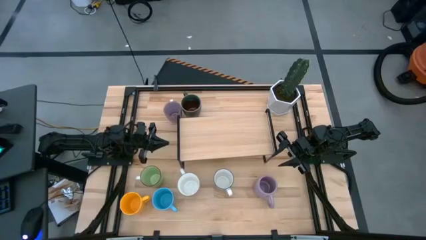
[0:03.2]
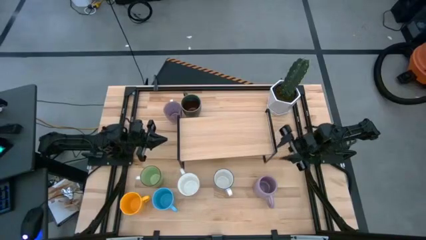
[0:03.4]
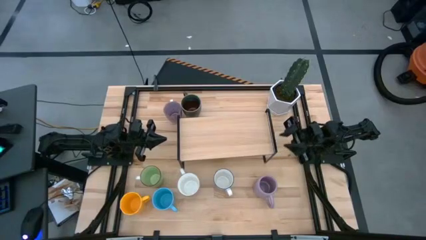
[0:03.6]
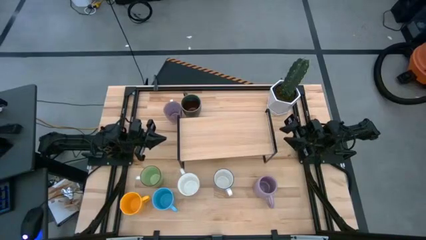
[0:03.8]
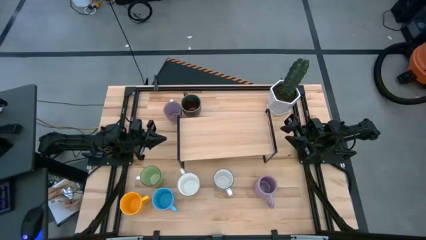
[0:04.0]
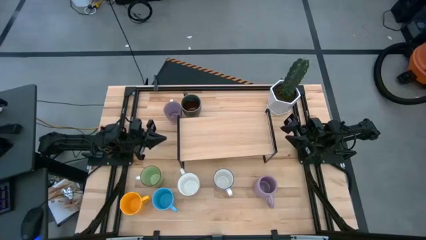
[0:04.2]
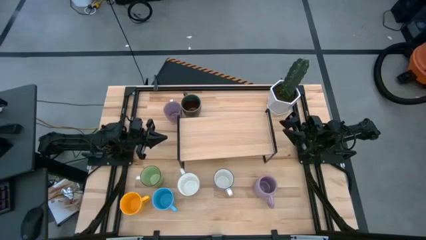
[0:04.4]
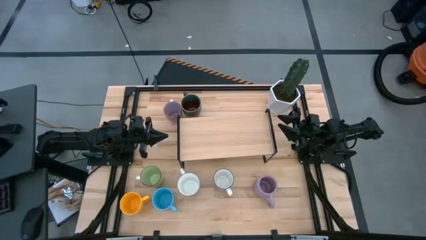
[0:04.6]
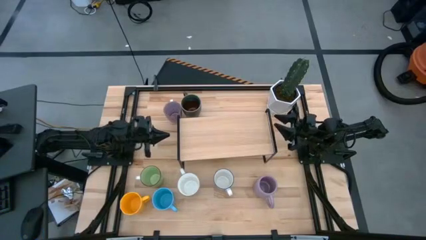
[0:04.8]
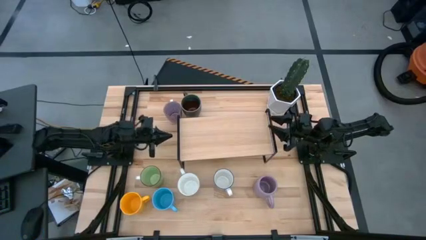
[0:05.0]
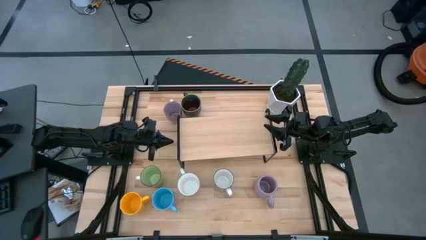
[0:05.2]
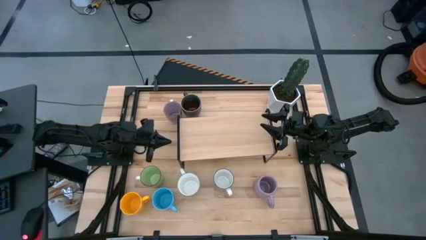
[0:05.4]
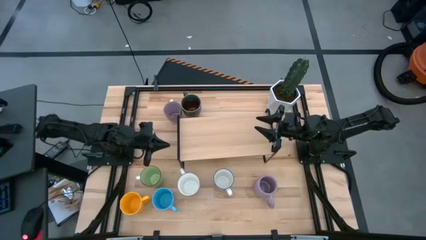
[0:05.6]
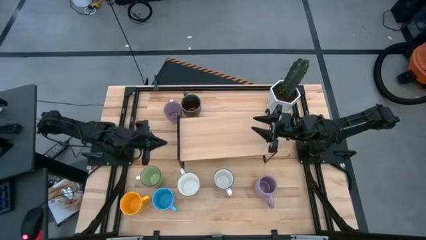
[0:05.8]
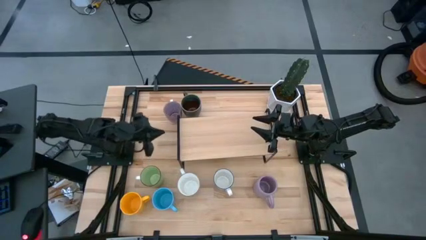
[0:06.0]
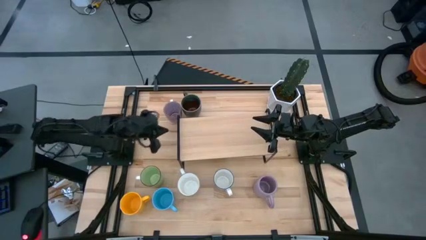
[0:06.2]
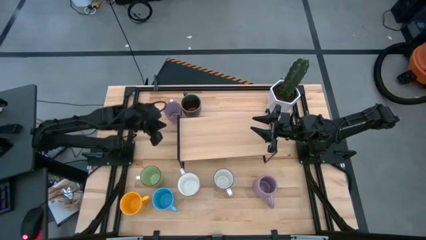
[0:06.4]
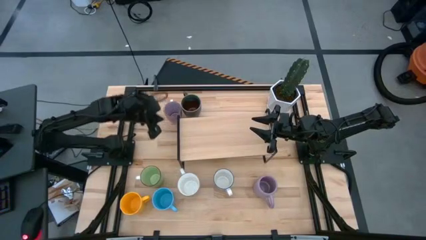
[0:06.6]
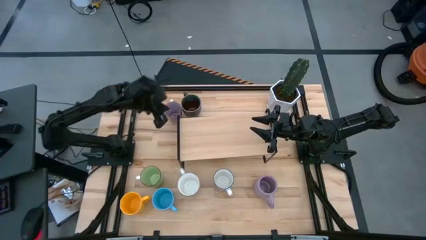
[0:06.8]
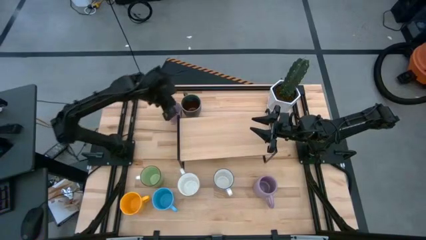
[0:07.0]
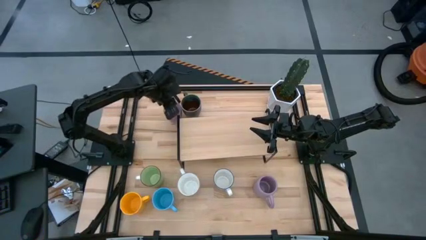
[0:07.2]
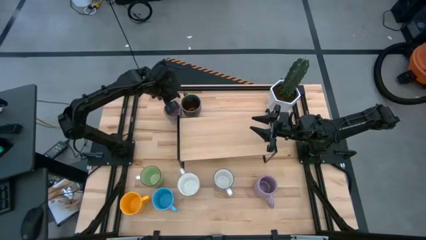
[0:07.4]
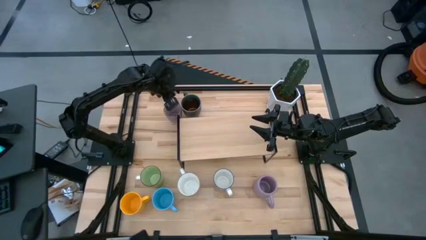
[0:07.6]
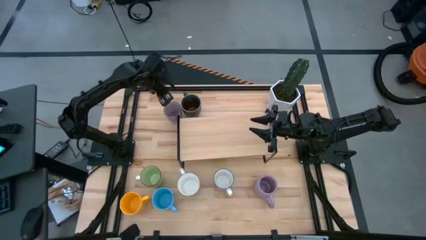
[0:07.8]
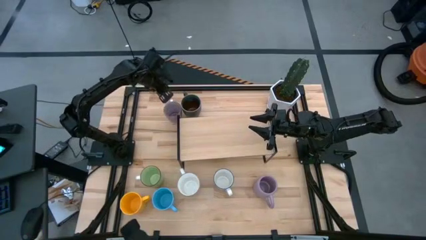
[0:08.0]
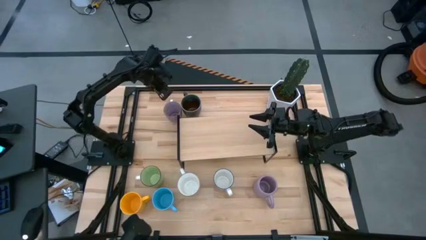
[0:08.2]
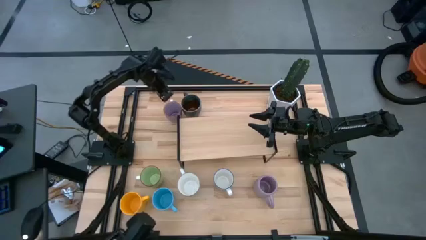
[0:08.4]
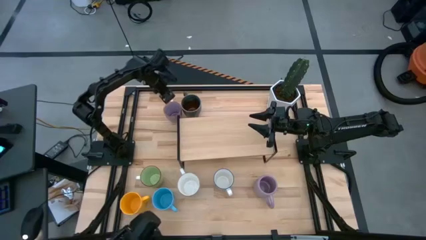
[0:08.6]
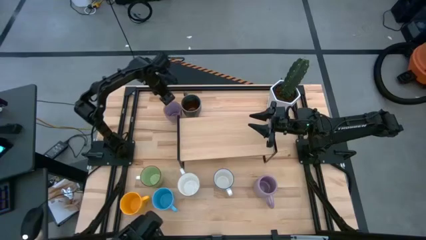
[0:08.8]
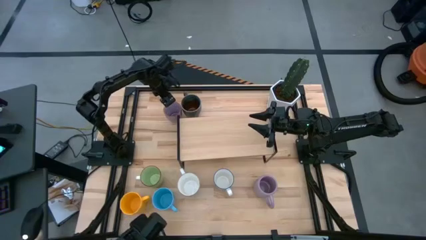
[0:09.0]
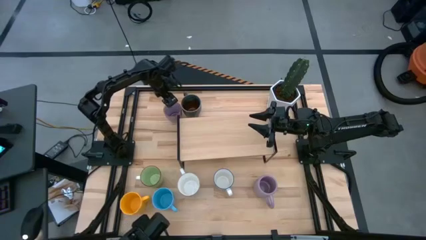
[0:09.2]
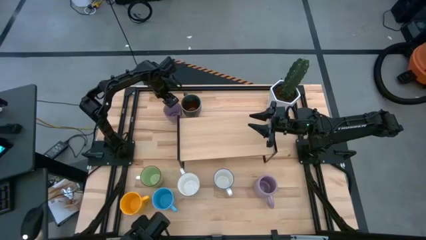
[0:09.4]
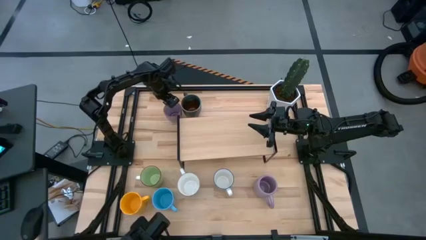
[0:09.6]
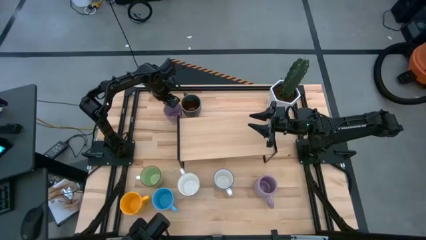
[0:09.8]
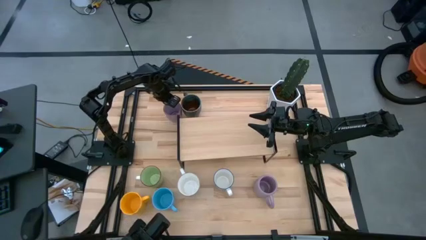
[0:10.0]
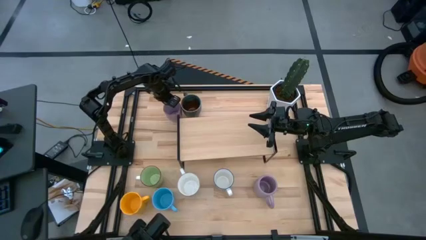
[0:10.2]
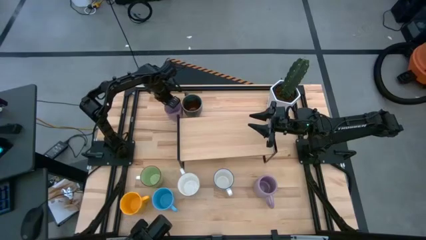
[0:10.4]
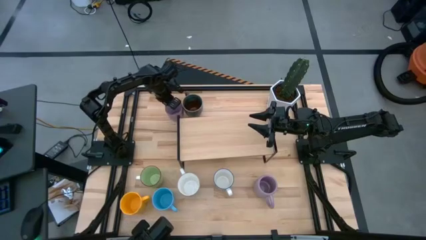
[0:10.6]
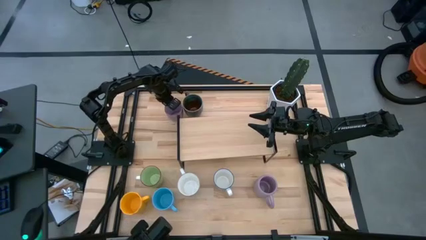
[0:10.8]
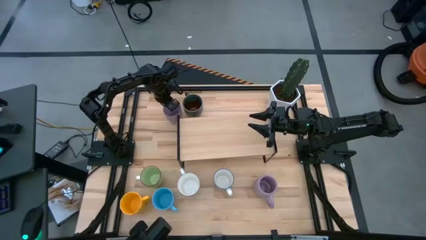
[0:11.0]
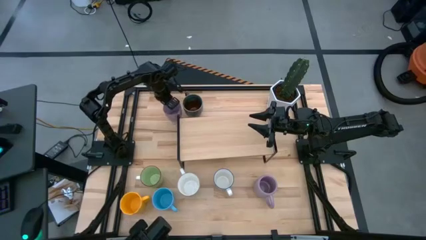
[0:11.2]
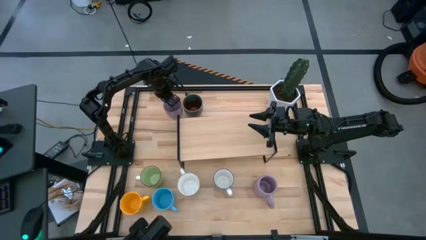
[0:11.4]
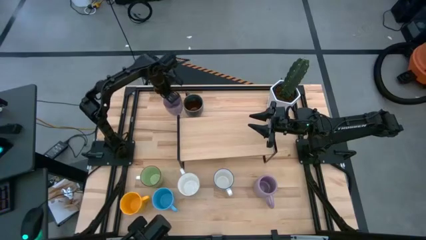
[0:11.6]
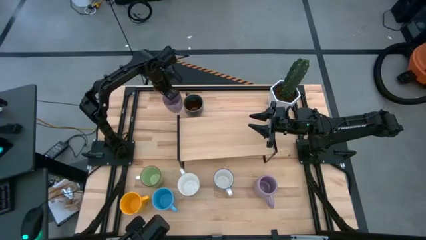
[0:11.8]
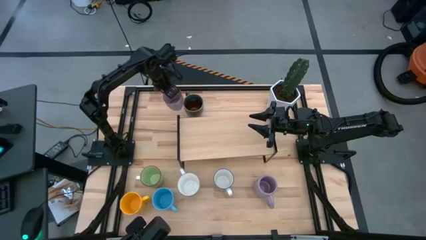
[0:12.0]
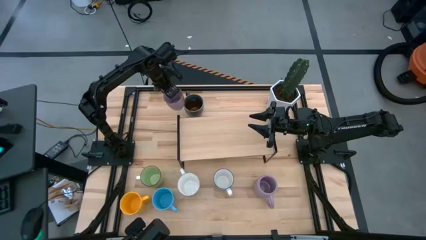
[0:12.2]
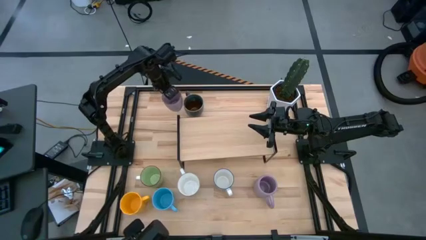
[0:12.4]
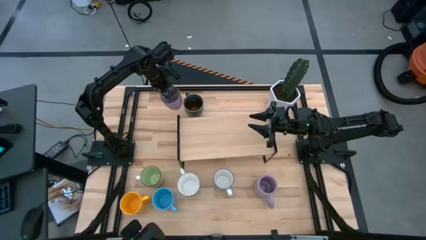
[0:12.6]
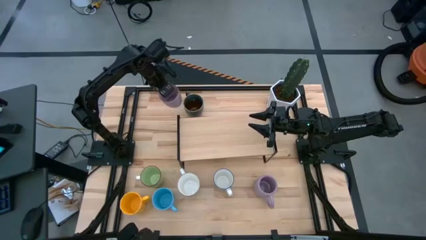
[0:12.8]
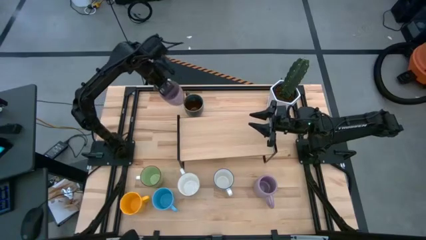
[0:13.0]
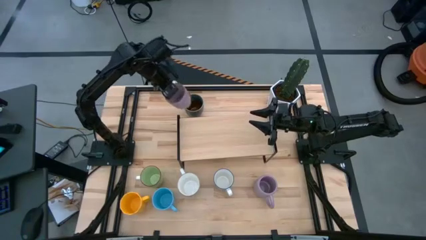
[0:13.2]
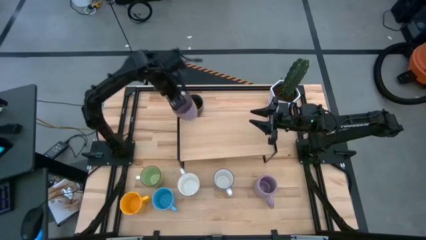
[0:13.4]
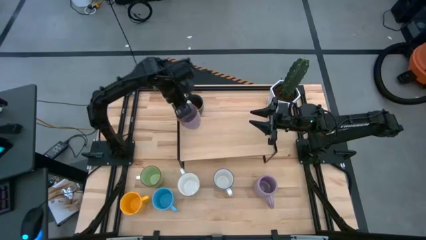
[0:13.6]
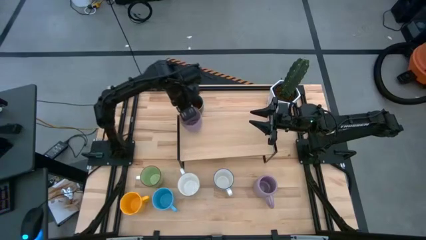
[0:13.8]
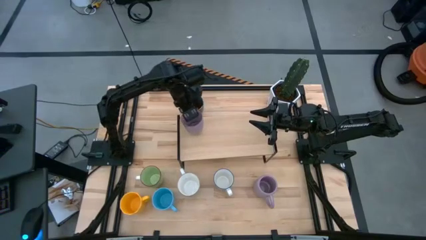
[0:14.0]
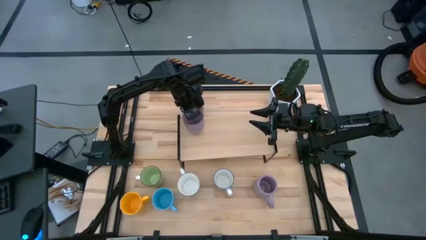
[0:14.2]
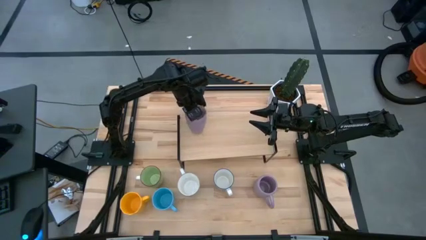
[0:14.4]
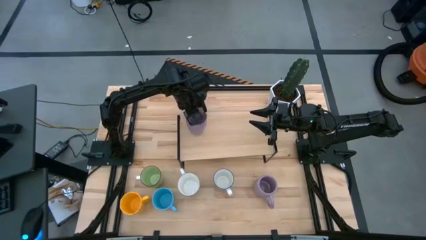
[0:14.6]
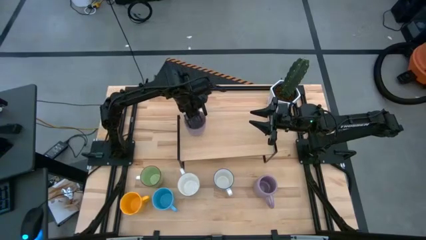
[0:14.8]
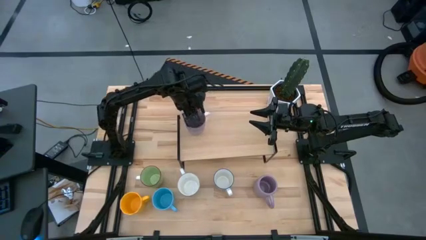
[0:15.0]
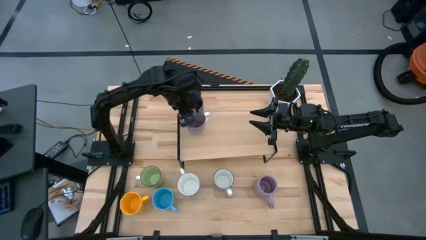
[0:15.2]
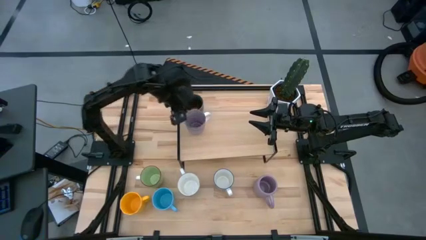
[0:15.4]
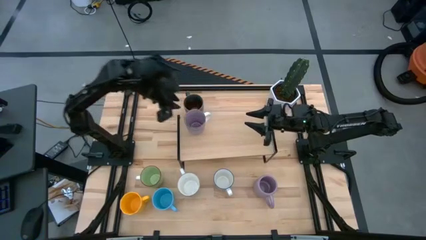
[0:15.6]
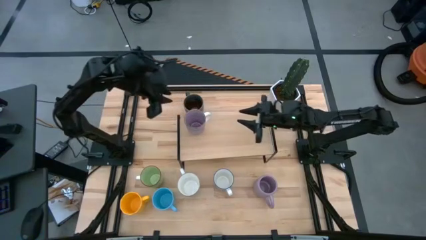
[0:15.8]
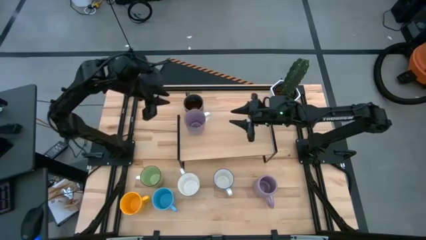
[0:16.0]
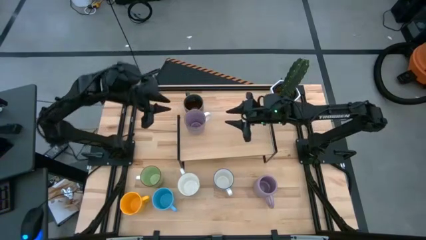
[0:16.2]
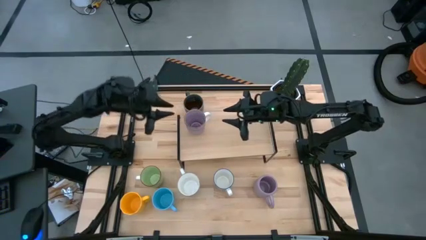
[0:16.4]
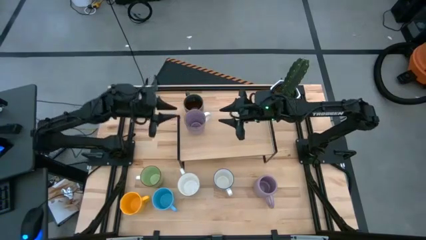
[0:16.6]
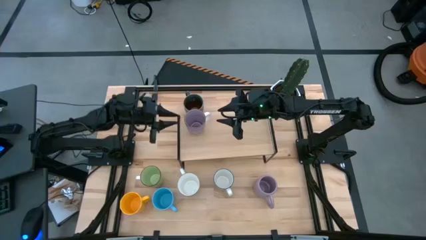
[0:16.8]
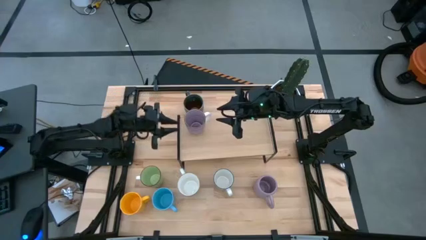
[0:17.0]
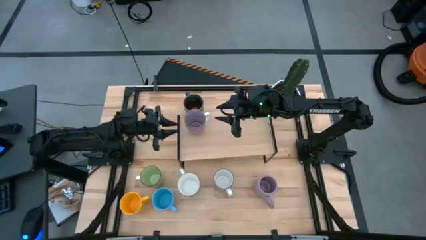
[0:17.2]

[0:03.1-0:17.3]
Task: Place coffee mugs
Put the top purple mug on the shelf

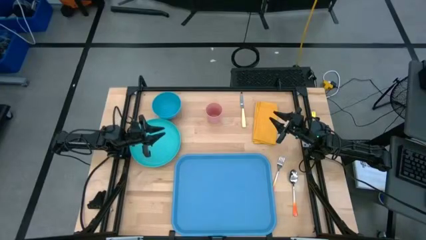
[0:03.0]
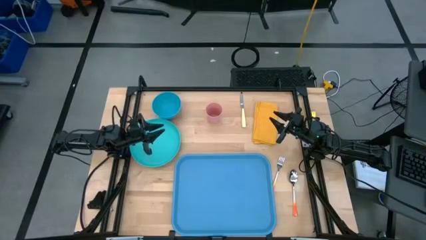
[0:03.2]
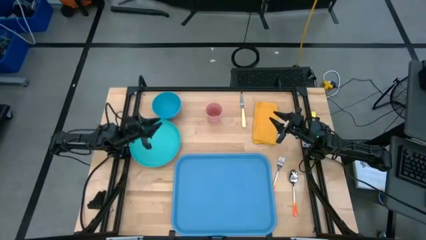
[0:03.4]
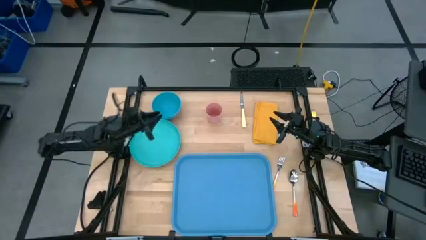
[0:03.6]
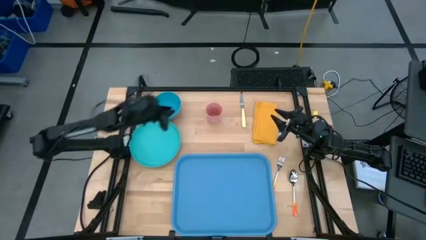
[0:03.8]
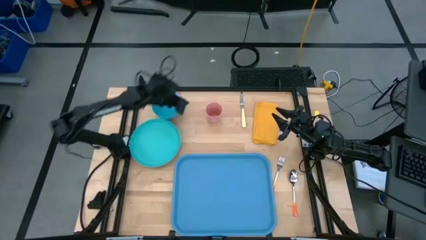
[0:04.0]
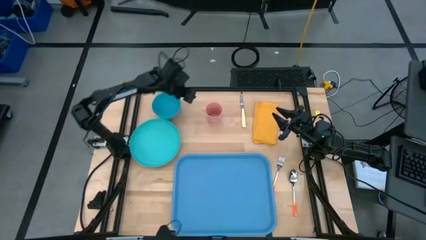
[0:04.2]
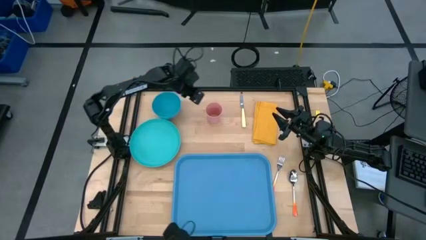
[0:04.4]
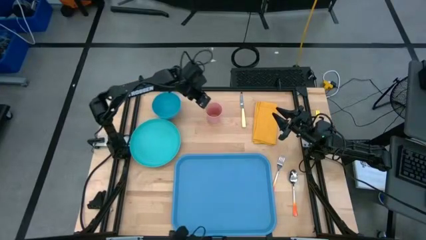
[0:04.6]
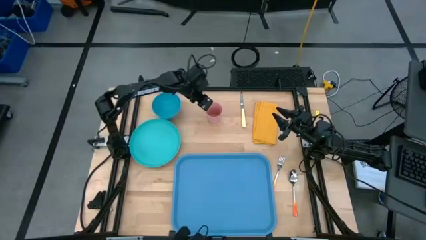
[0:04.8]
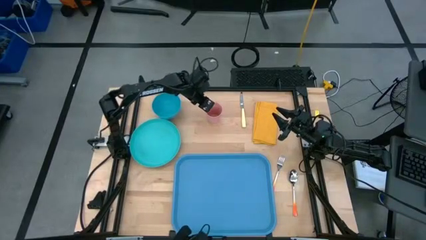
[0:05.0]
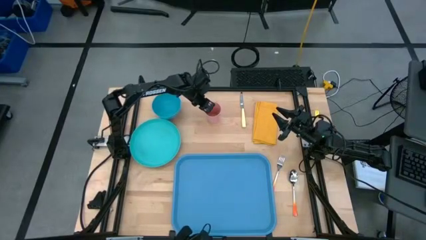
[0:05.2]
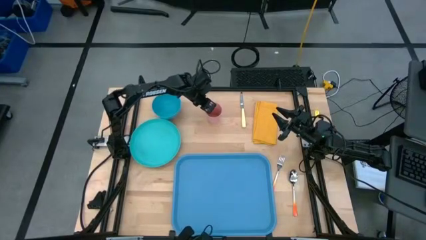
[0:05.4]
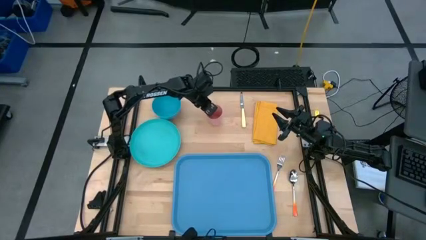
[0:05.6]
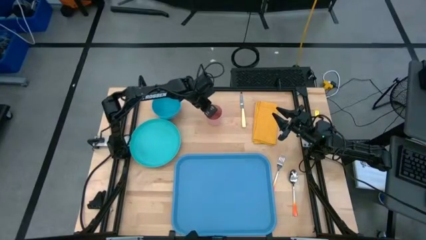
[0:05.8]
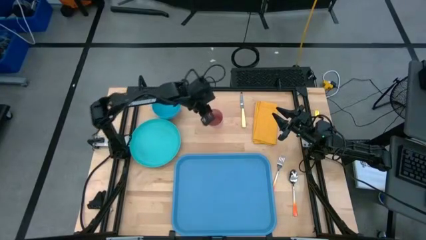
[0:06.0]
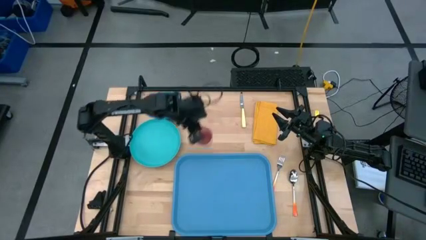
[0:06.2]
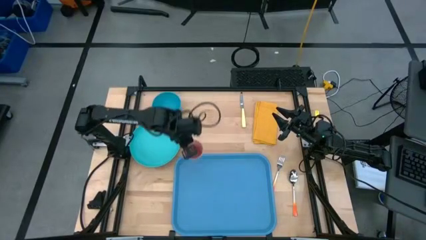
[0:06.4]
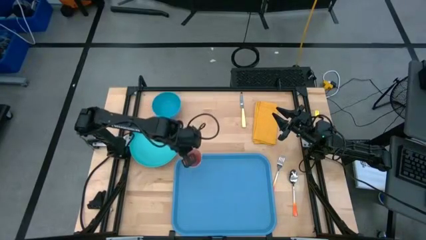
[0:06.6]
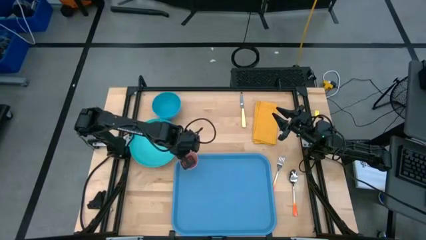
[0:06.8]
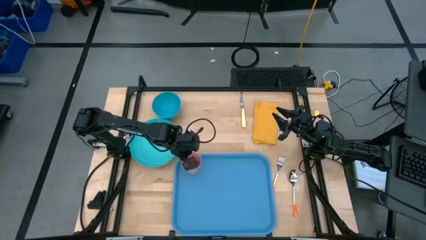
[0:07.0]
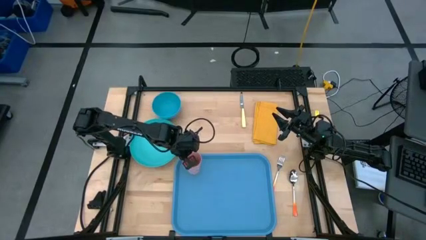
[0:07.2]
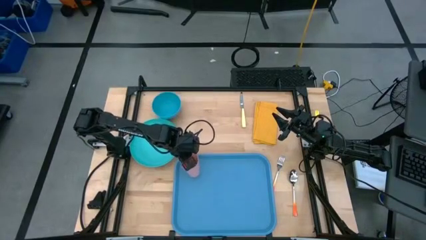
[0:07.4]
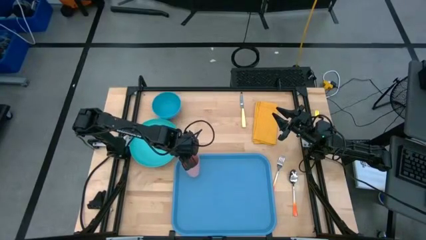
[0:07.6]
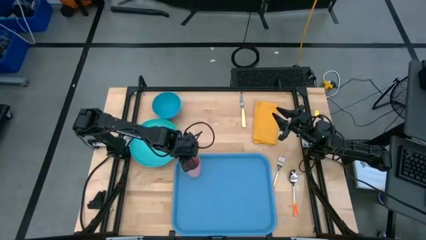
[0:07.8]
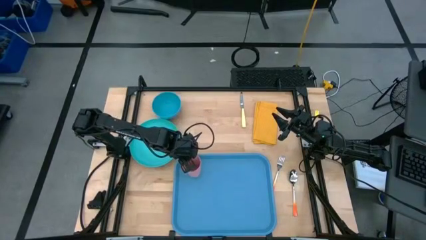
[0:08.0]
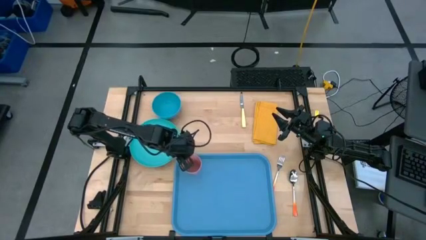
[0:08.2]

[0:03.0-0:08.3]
Task: Set up tray
Put the pink cup on the top left of the blue tray
